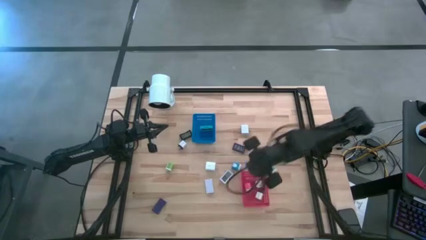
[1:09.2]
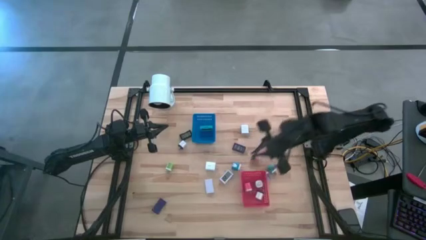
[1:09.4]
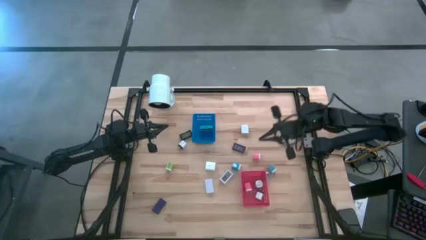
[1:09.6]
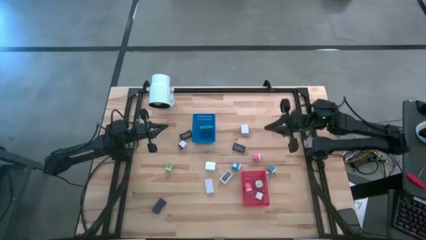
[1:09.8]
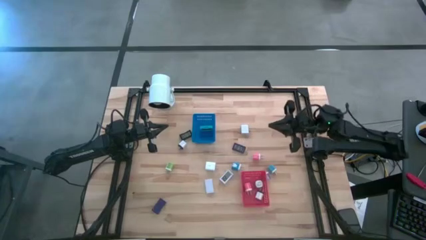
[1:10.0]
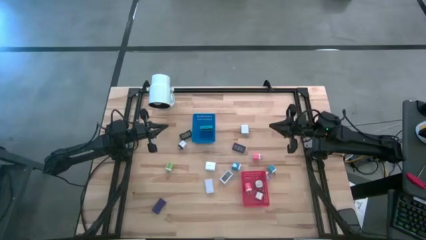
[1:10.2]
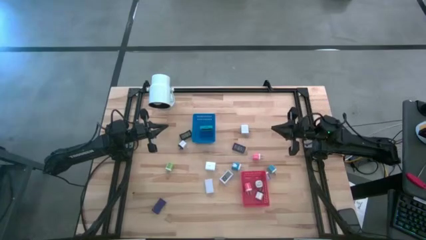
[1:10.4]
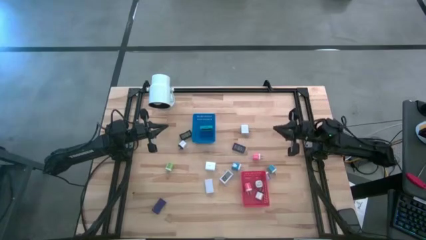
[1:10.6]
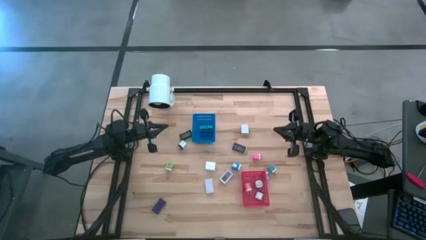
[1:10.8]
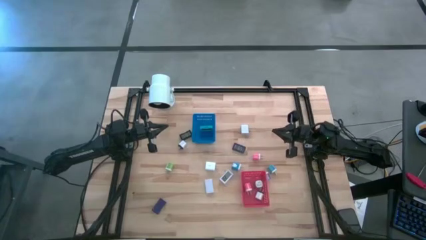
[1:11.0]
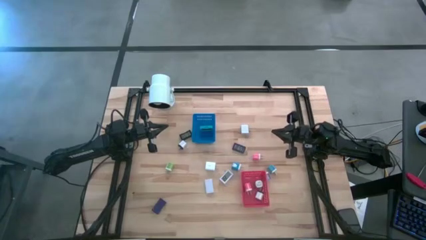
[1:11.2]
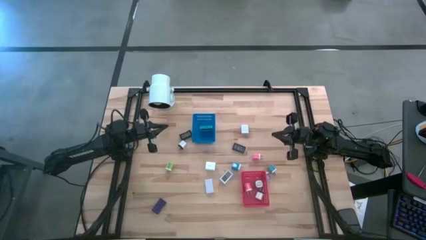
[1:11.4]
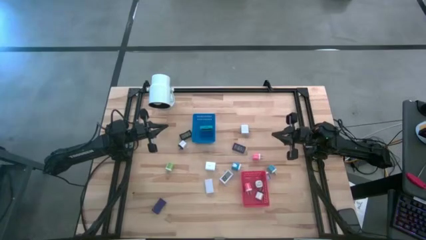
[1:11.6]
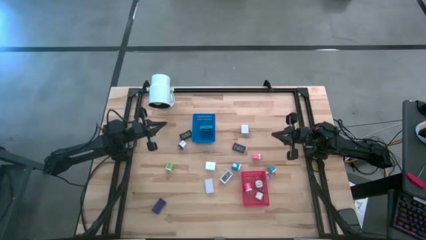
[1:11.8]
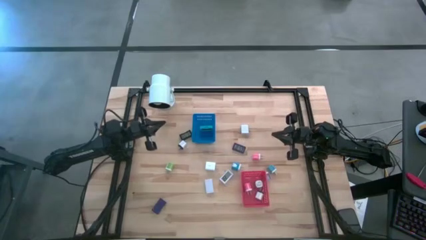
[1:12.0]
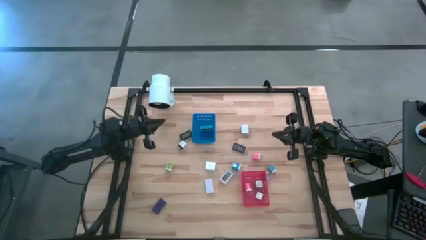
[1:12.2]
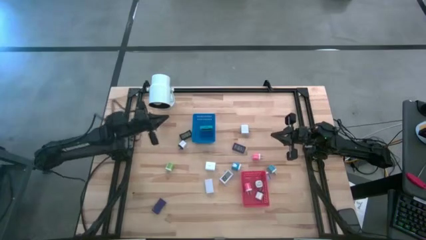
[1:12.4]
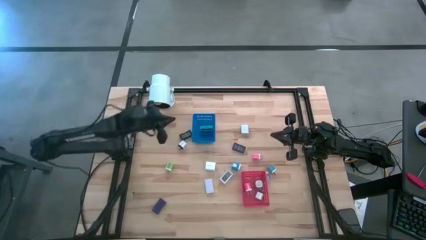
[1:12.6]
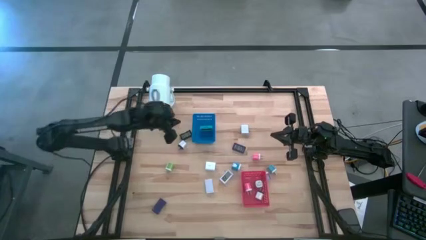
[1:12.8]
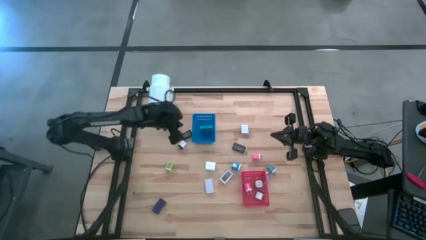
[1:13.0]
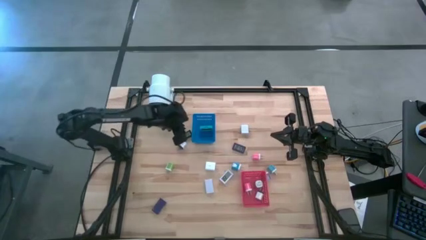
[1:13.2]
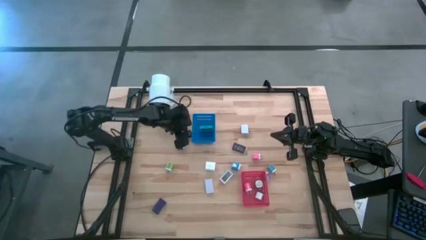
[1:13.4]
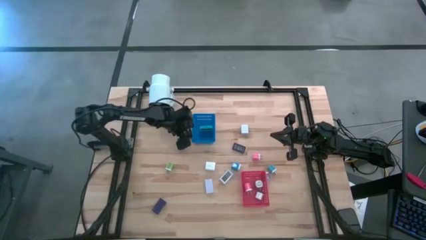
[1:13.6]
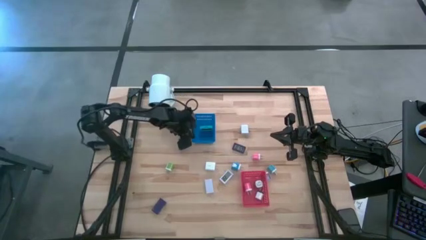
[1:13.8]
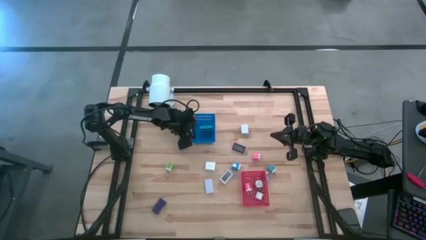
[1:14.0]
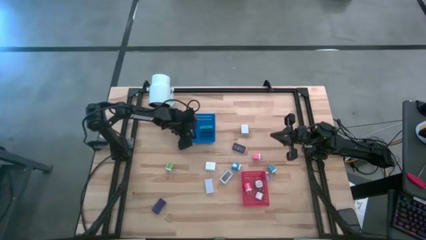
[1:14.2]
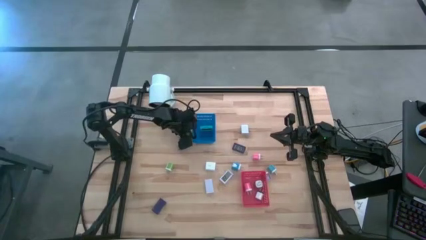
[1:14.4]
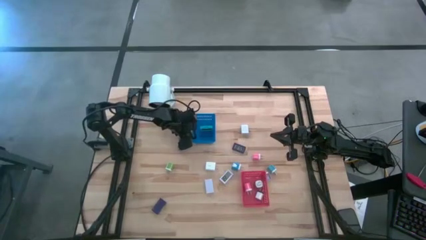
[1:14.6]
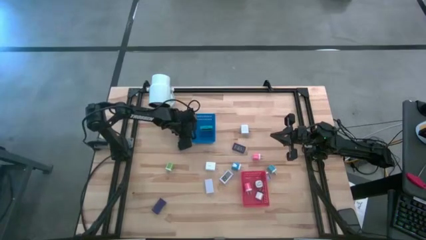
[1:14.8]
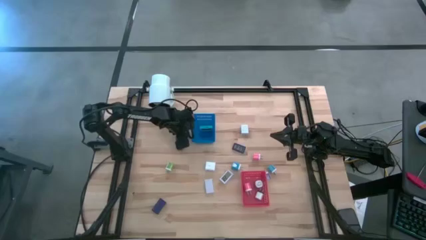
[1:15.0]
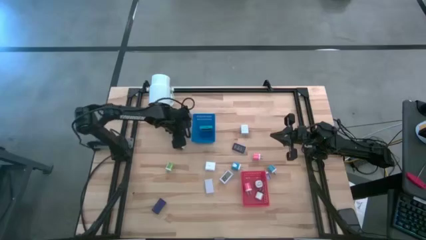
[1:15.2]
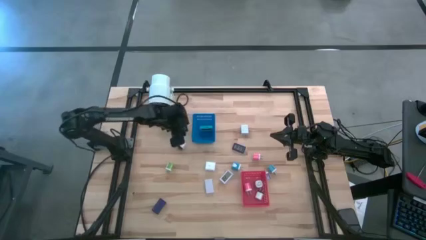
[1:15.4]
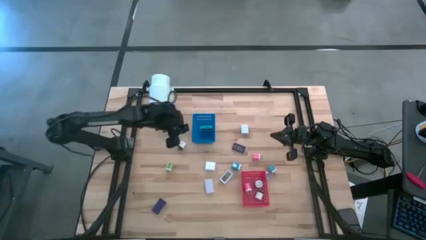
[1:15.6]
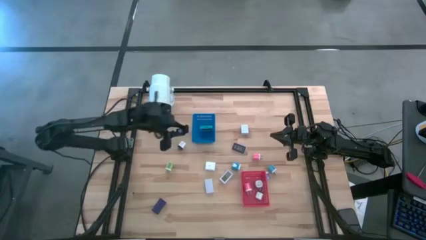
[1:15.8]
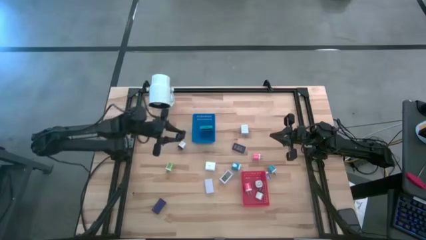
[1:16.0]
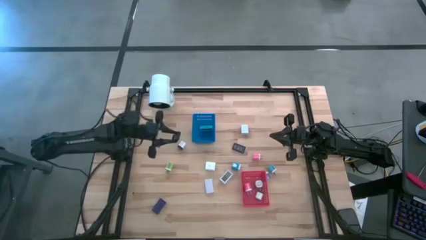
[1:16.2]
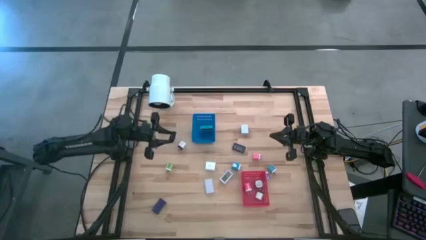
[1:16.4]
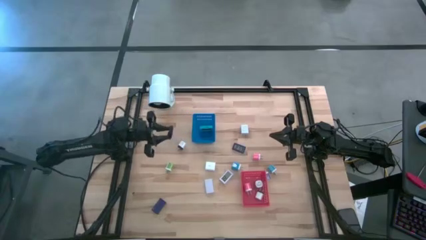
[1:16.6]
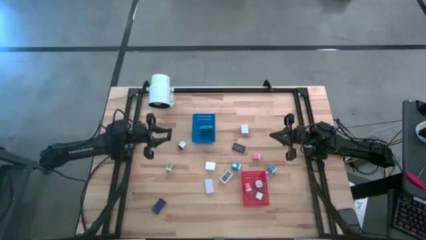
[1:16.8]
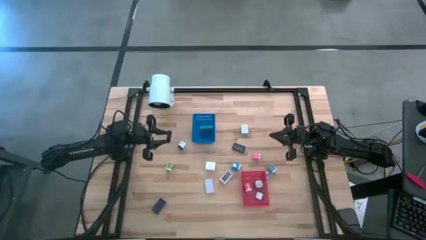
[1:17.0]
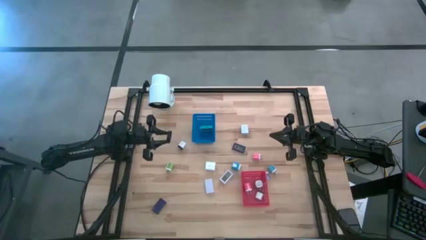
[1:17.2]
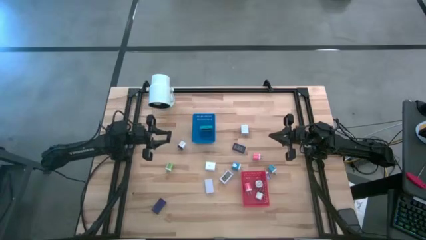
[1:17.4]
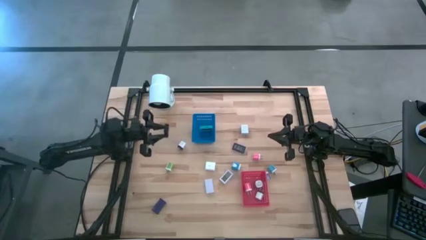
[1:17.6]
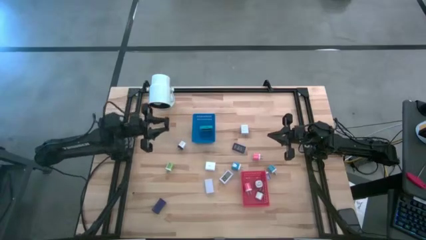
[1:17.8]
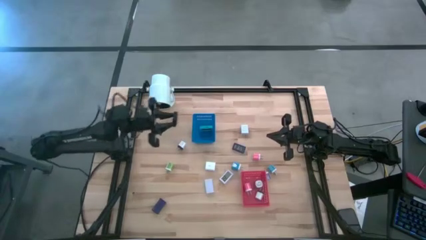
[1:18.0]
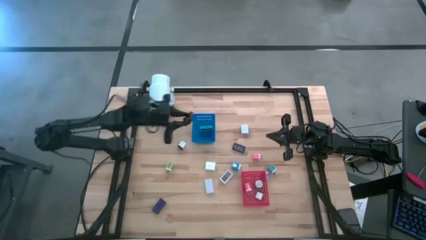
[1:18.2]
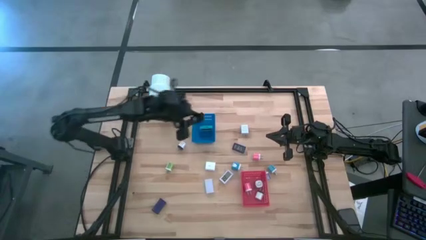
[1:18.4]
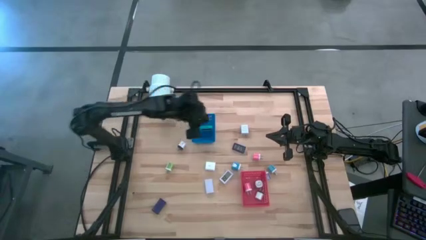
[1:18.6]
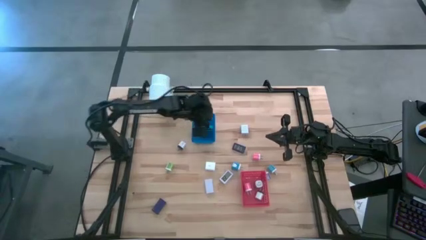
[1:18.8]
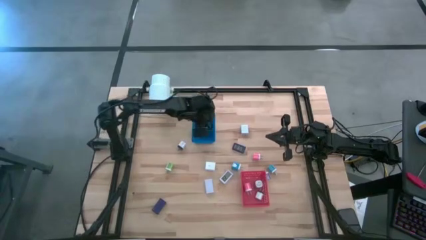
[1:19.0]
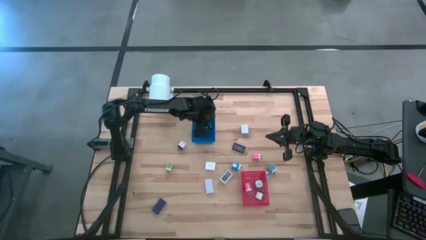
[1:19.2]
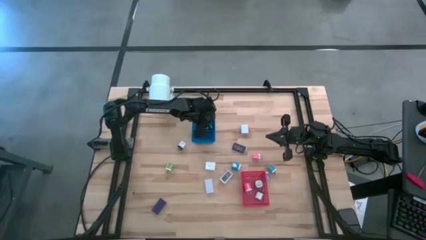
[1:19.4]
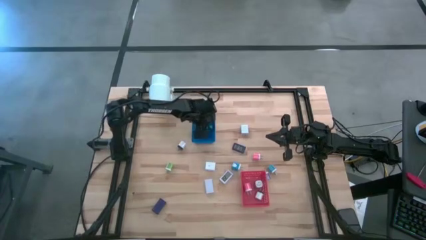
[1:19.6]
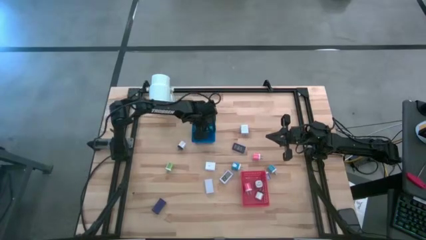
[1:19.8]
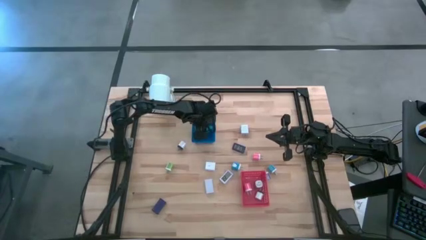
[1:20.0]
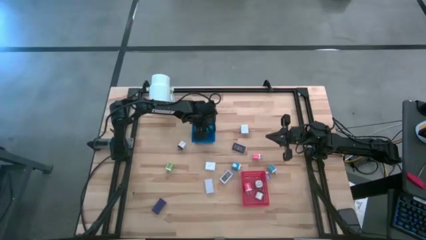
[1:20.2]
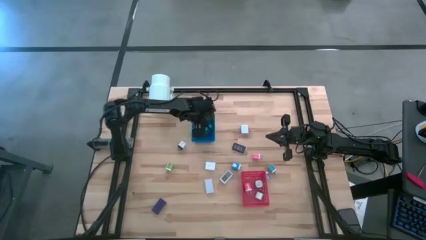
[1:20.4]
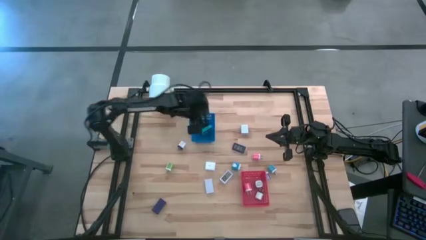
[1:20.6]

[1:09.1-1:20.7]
Task: Pick & Place Office items
Put the black digital clock into the blue bin

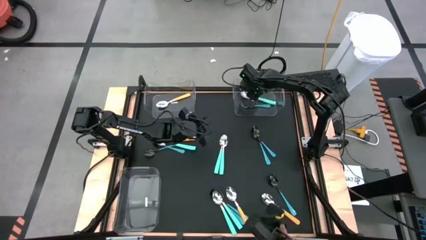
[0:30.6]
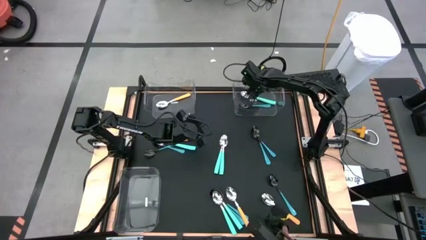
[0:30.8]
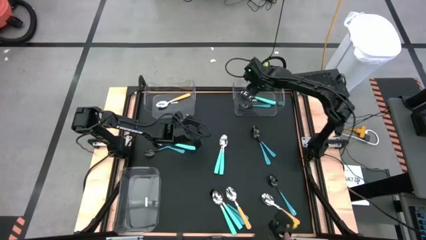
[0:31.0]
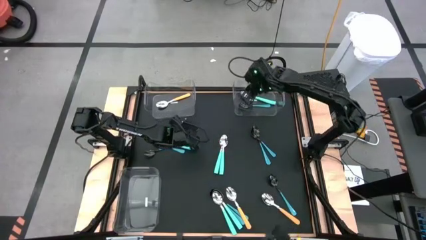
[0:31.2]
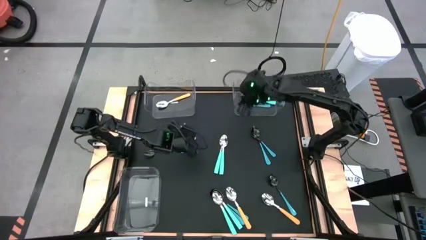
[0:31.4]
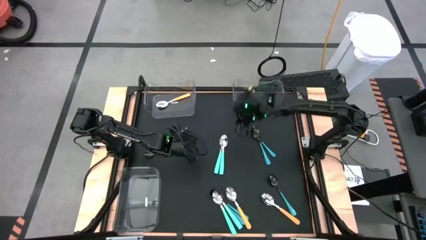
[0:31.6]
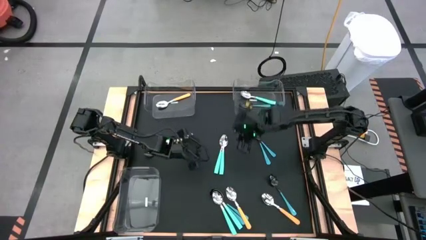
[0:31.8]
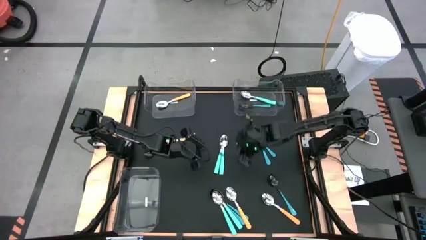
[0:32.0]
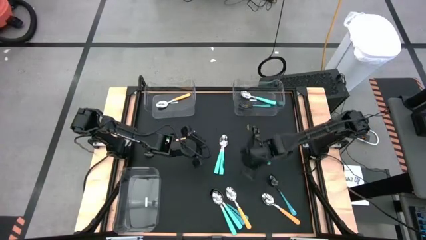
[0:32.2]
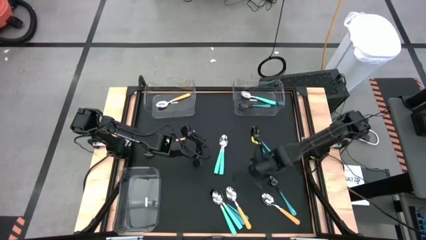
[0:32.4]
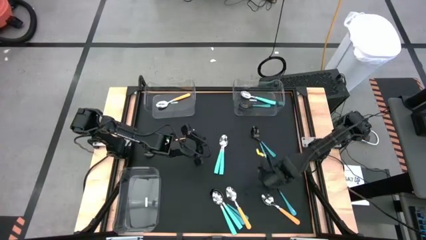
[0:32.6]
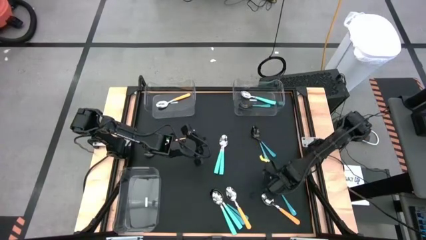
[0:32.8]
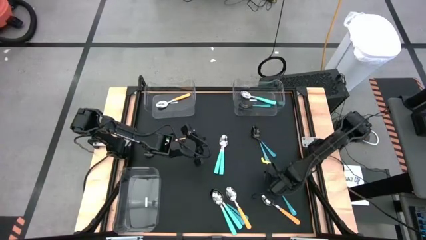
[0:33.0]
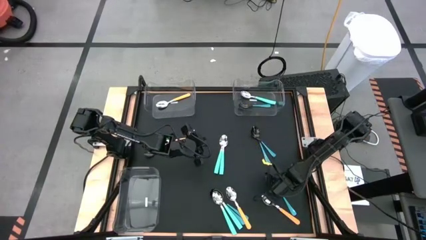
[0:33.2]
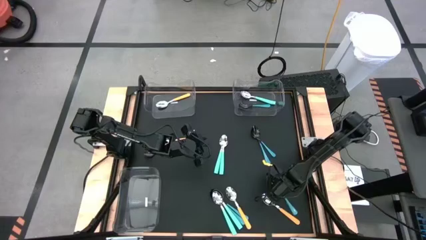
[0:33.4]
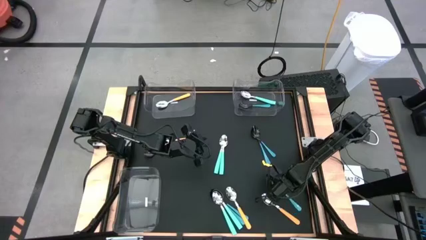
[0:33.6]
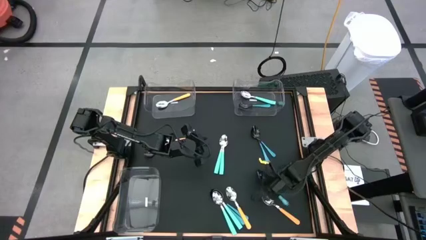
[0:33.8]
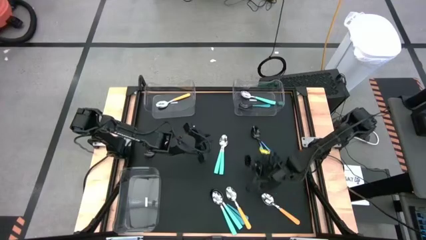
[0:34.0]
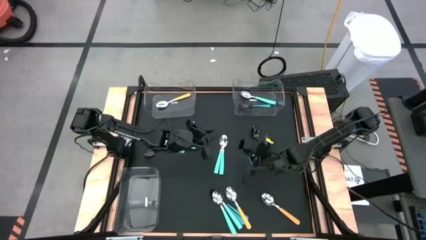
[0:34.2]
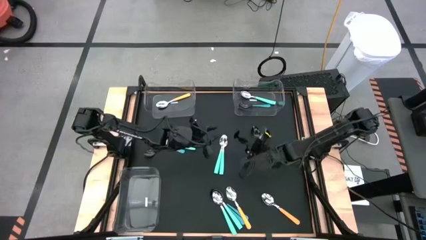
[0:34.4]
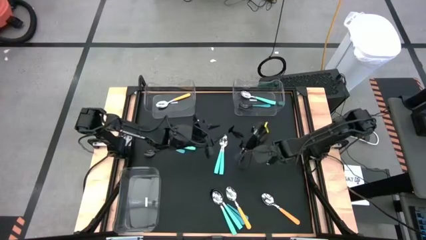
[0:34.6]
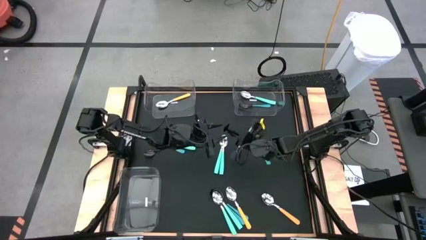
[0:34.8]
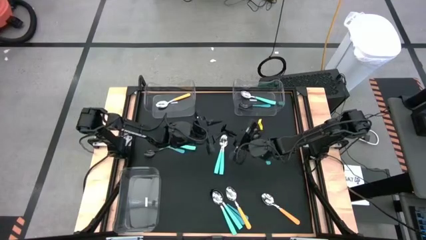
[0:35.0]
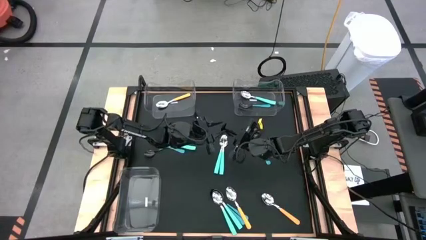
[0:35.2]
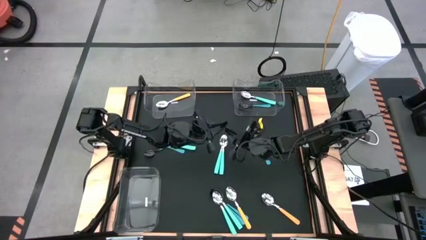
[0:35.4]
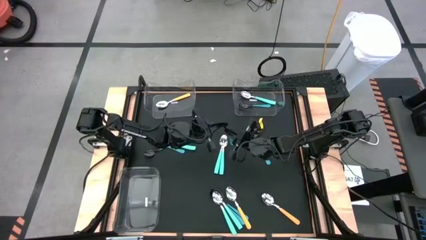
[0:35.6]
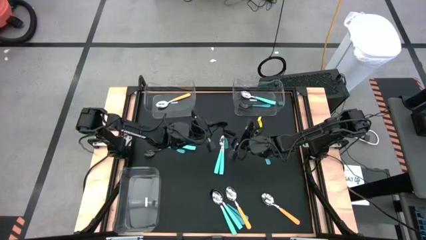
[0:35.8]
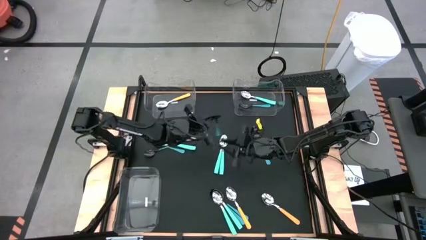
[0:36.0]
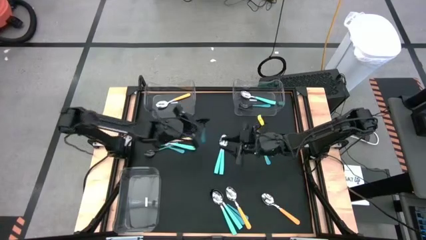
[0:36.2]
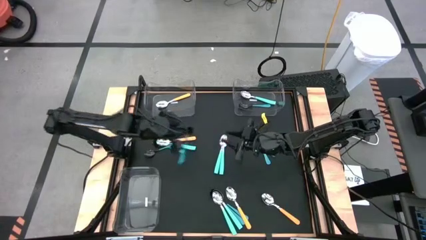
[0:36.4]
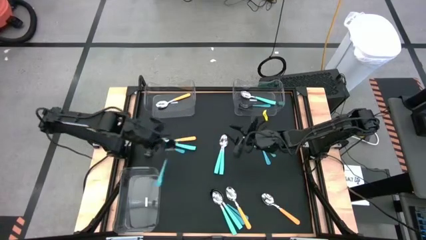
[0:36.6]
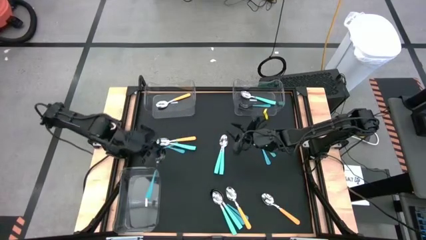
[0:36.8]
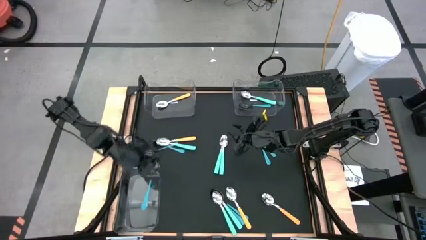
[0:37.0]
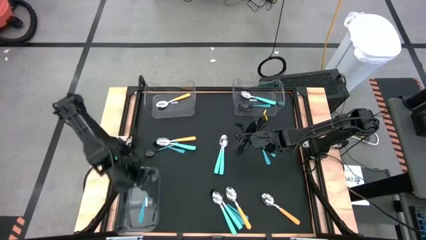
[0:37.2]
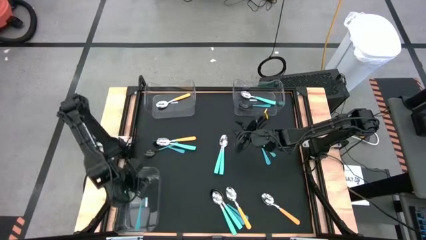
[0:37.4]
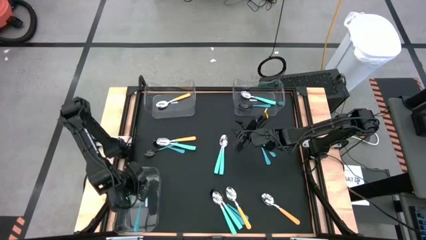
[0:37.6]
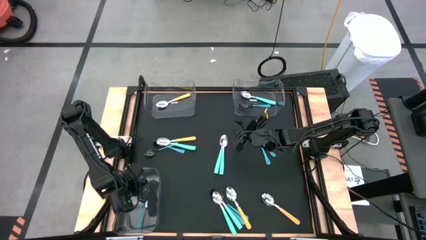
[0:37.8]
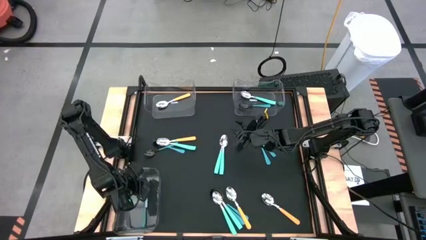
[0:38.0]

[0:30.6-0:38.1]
Task: Sort silverware by color (type)
Put the blue spoon into the bottom left transparent bin
